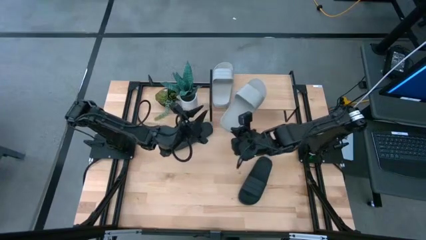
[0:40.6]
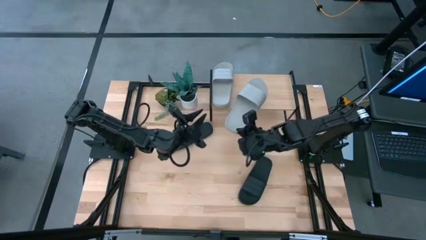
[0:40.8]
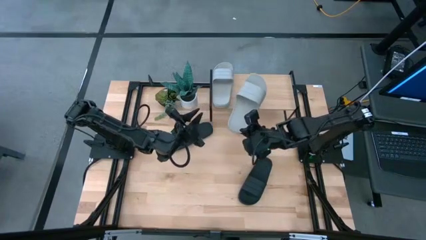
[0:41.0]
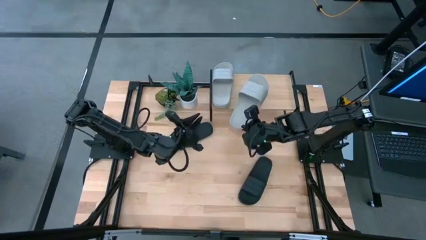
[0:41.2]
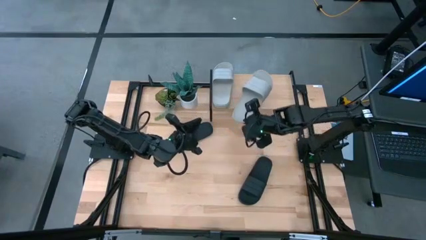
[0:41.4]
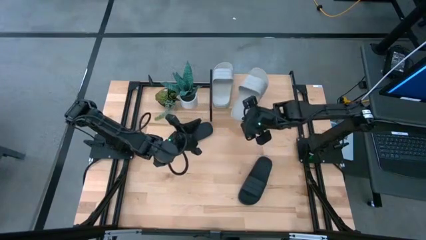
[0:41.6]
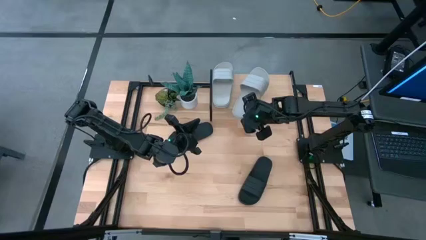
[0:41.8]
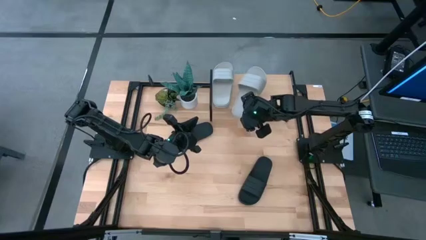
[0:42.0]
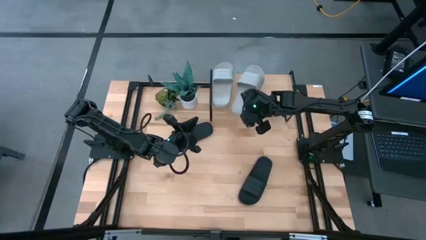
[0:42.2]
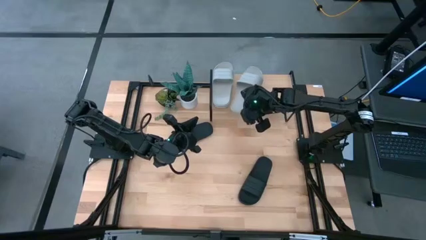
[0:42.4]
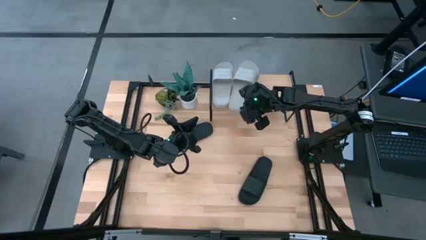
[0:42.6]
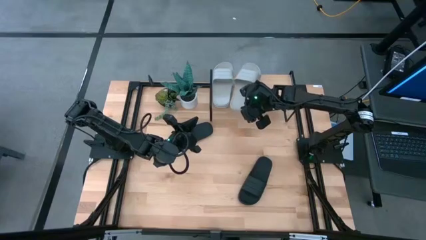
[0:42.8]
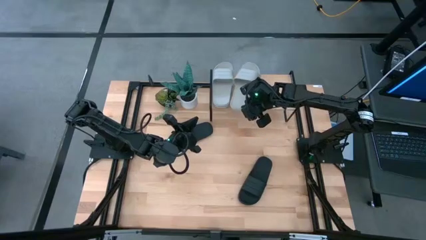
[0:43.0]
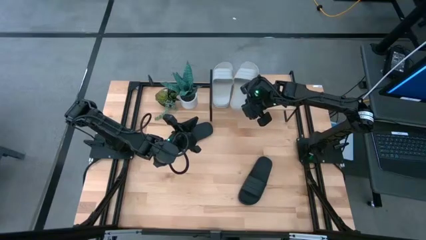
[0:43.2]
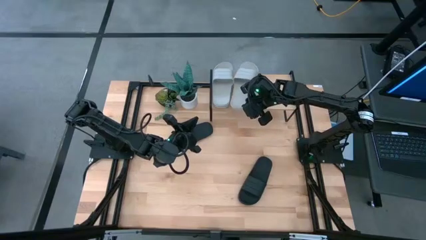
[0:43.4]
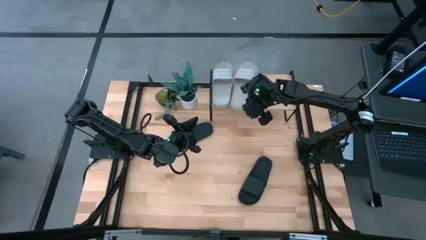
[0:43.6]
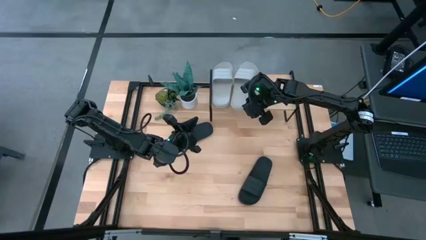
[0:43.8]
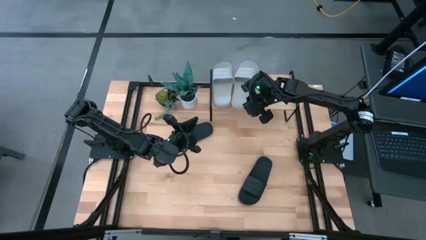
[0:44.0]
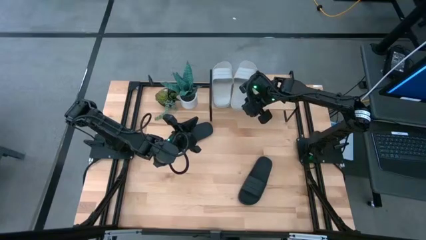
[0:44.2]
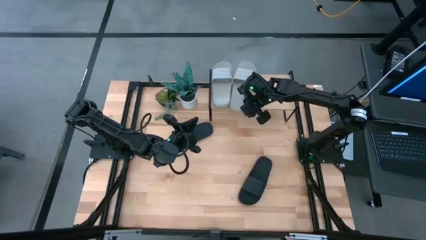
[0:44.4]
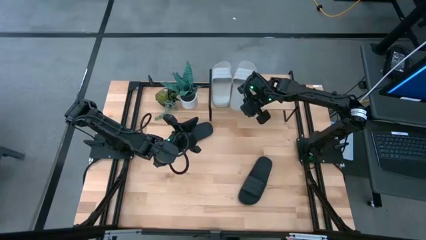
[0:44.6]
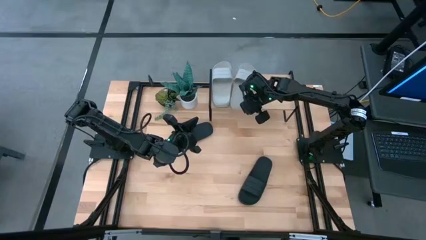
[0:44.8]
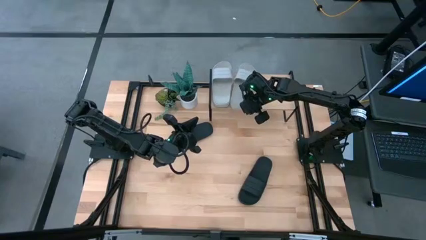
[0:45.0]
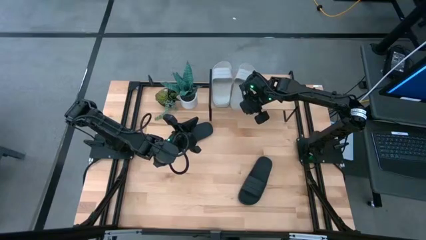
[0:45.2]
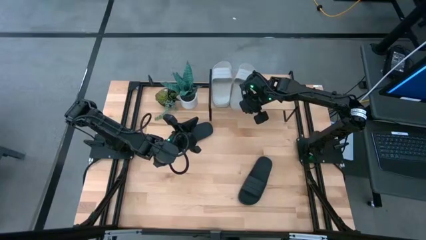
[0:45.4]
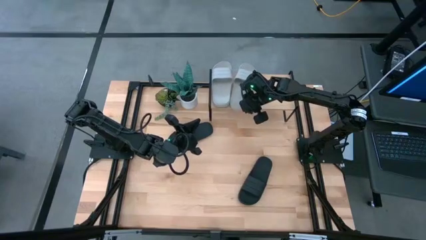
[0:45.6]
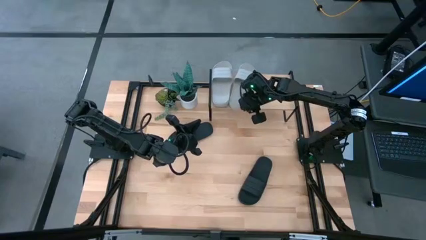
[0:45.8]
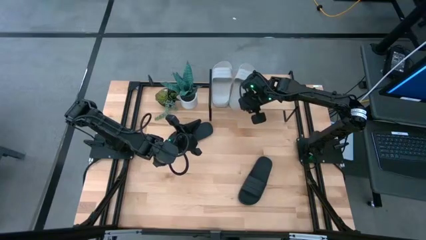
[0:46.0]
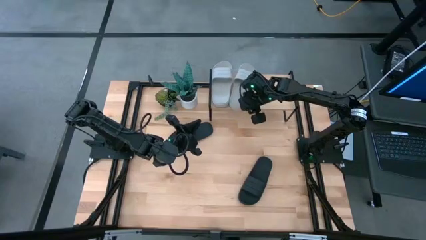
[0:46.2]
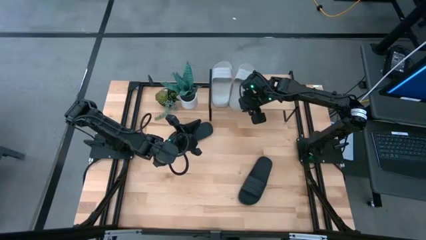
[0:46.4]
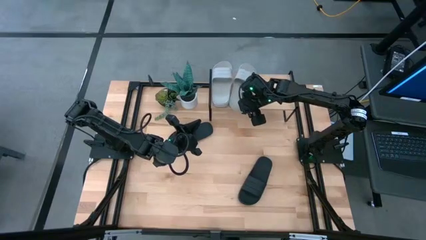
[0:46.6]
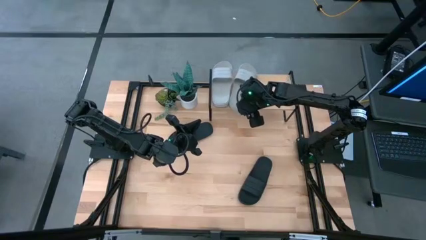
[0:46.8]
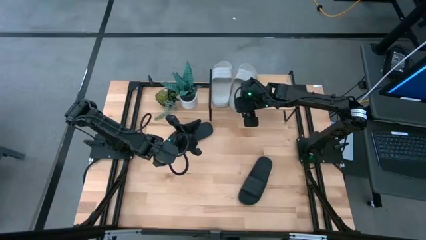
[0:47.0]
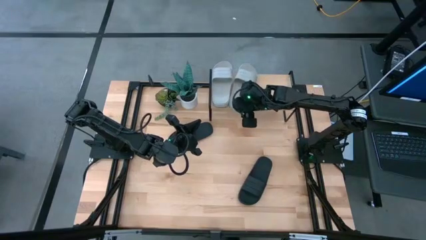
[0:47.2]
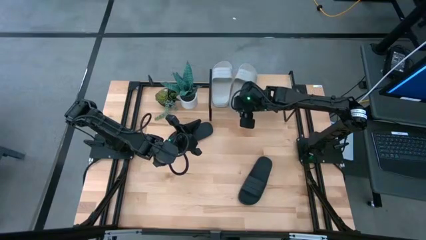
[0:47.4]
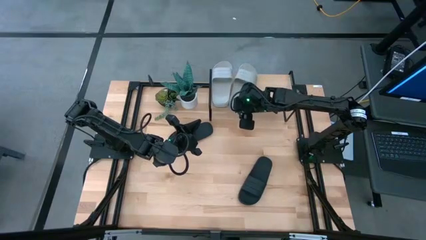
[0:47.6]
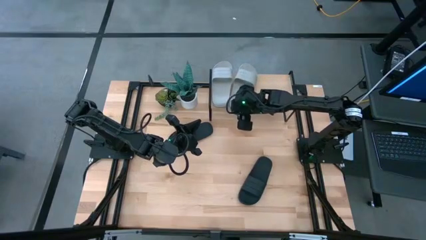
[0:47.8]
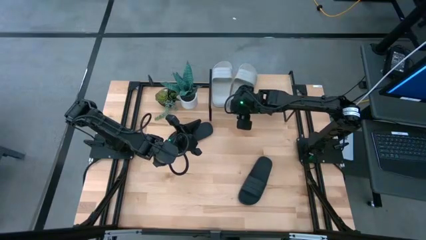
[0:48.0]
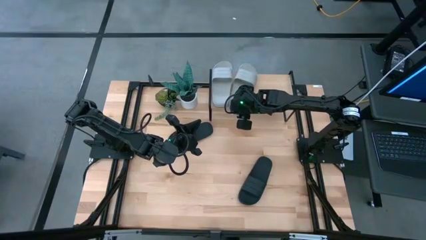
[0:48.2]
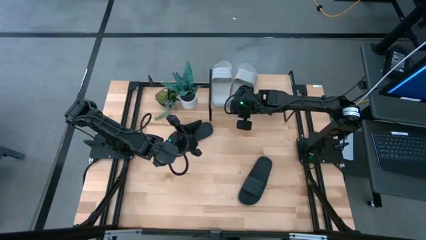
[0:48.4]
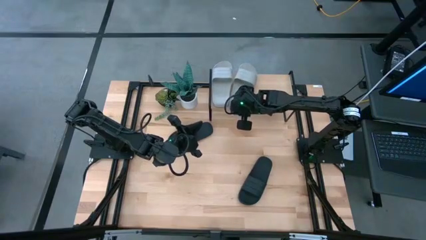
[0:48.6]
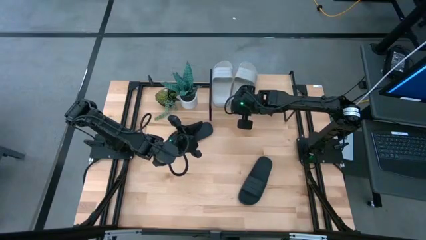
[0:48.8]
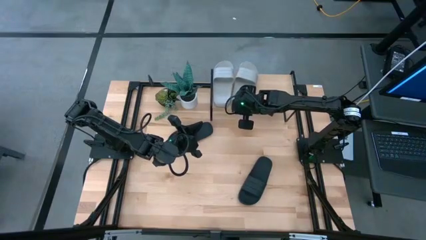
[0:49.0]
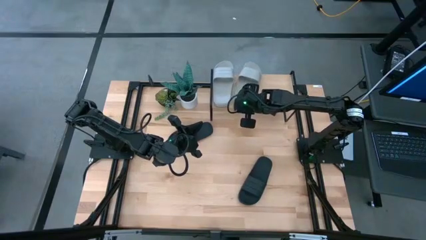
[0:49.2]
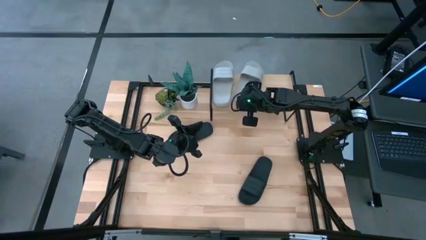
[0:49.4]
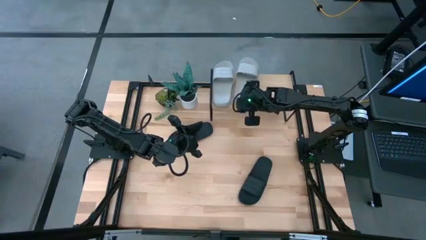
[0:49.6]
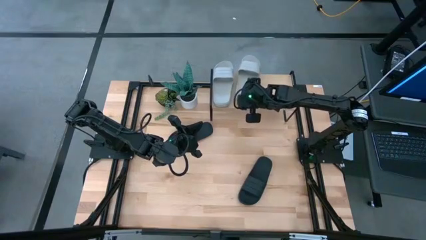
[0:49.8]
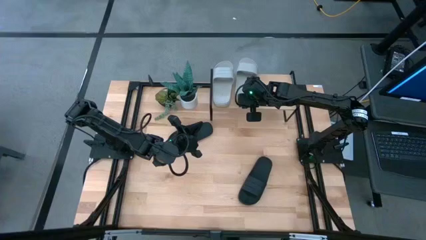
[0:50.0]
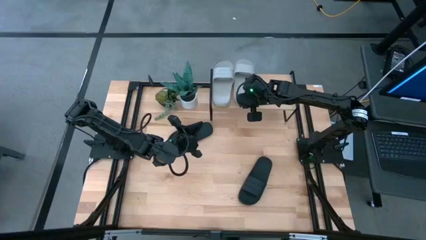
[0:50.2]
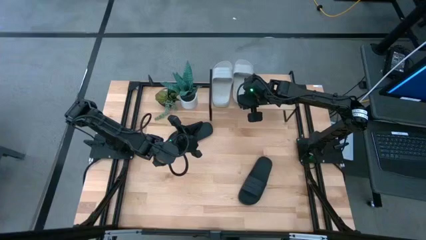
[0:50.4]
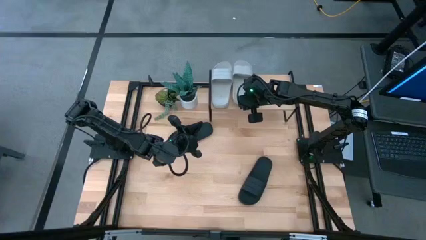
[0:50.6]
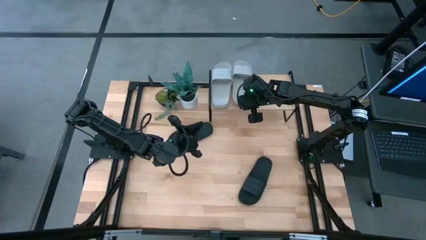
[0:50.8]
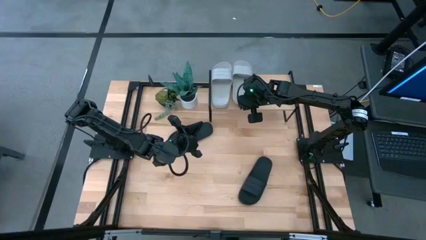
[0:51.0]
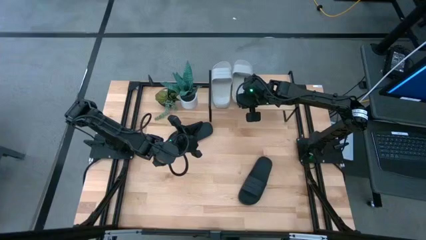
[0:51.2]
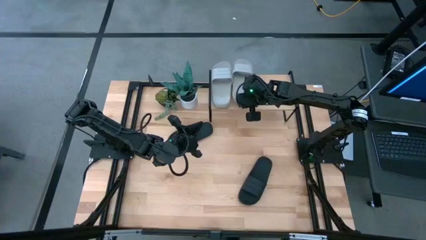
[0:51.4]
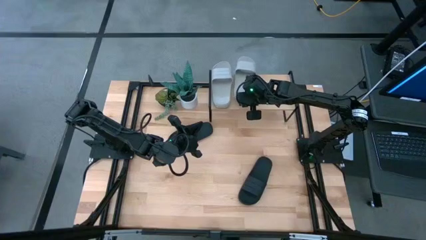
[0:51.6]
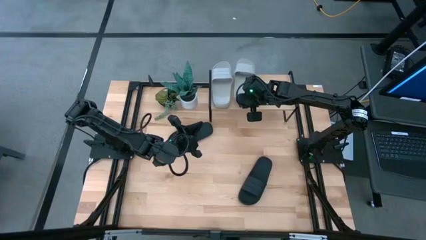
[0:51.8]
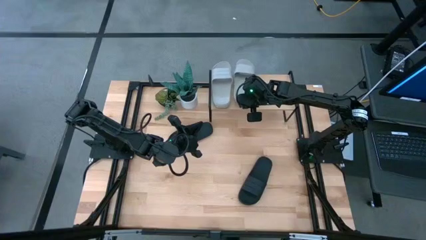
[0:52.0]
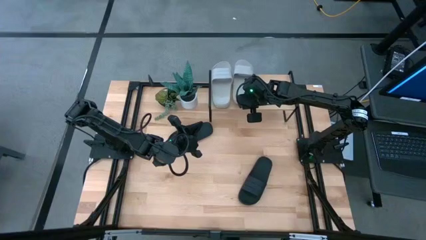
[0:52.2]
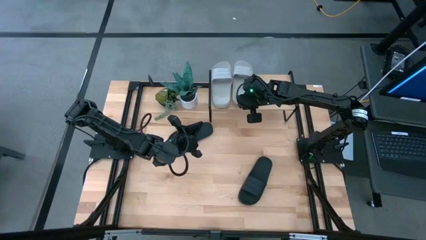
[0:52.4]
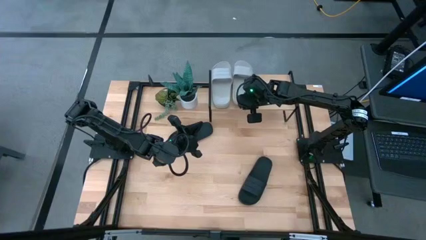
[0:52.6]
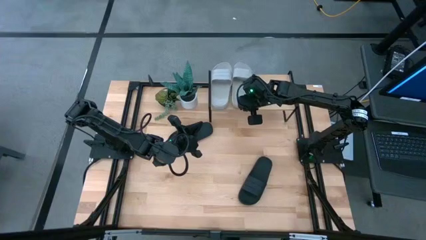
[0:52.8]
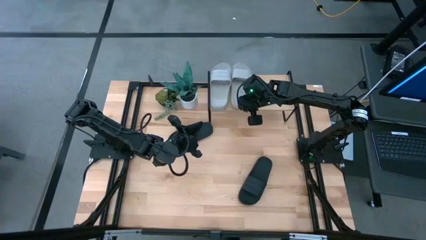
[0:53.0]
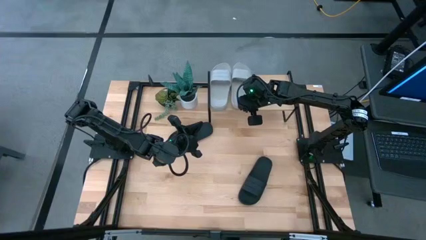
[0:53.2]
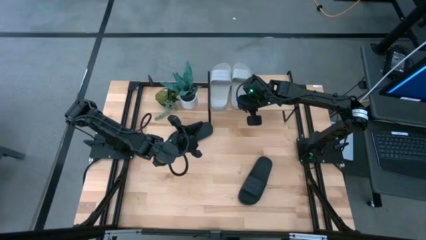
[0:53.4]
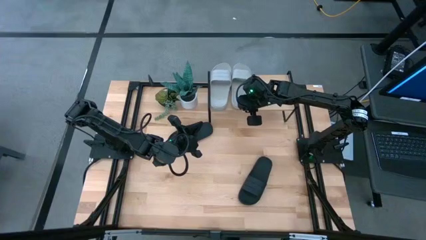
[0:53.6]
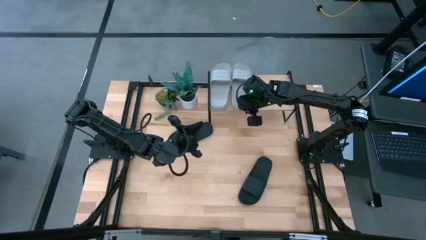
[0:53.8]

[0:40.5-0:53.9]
Task: Pick and place slides into the shelf
Put the gray slipper on the shelf

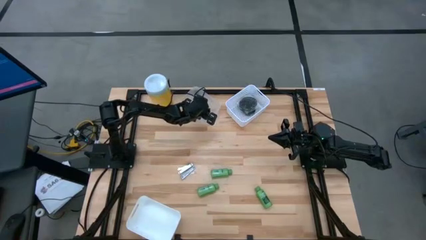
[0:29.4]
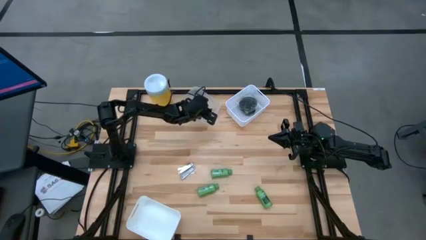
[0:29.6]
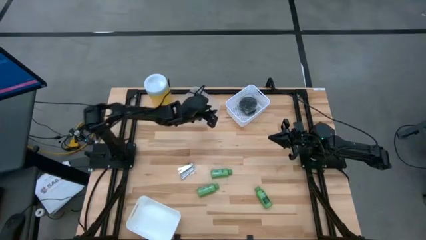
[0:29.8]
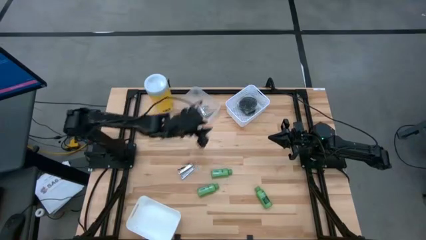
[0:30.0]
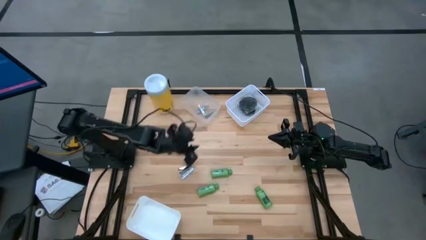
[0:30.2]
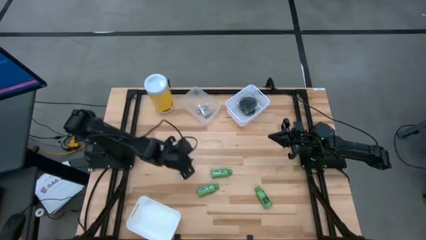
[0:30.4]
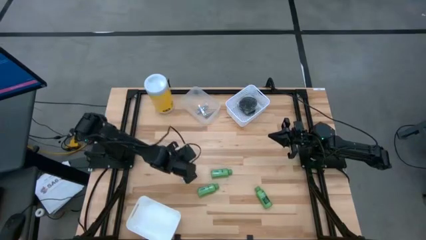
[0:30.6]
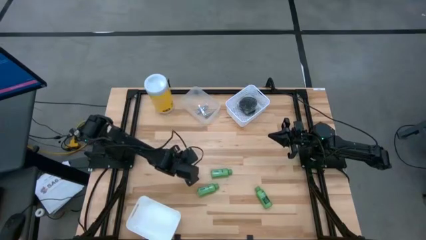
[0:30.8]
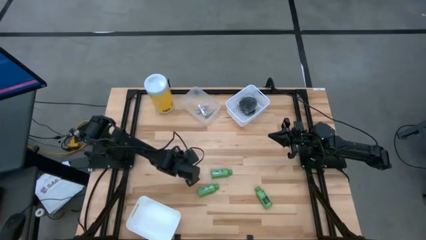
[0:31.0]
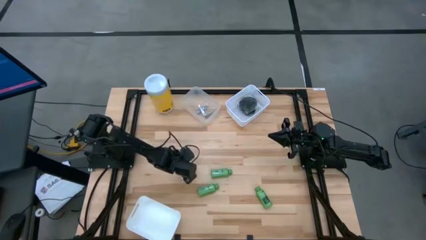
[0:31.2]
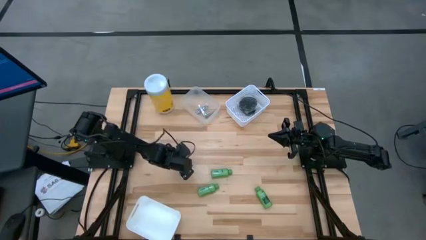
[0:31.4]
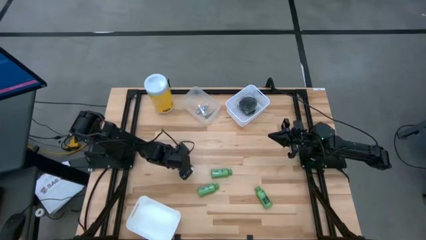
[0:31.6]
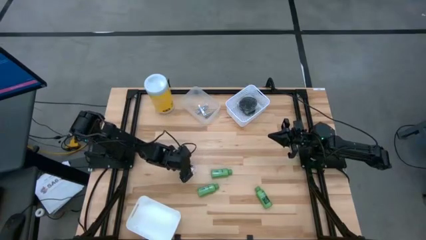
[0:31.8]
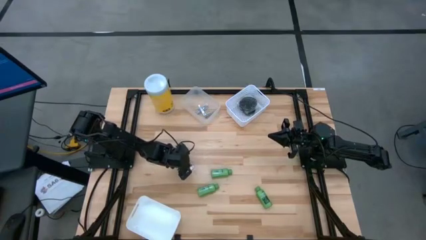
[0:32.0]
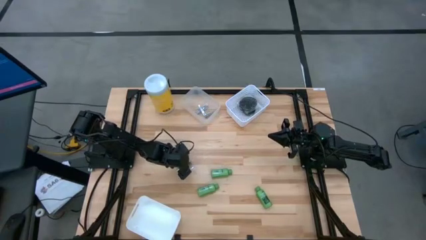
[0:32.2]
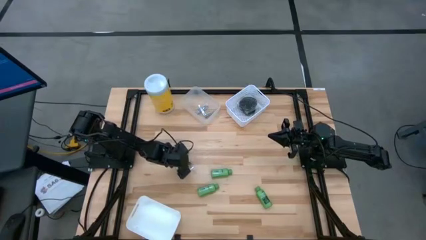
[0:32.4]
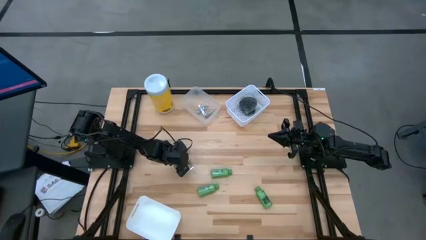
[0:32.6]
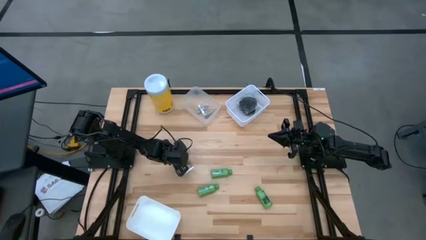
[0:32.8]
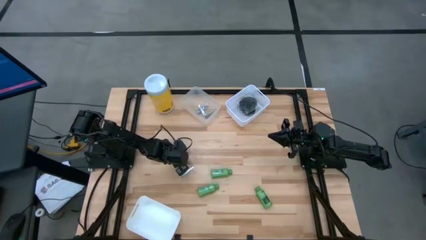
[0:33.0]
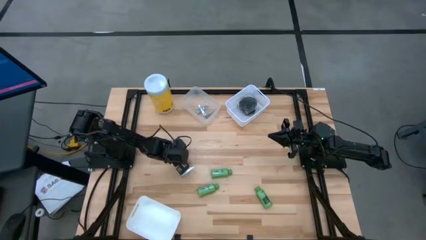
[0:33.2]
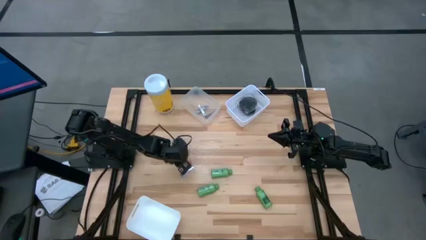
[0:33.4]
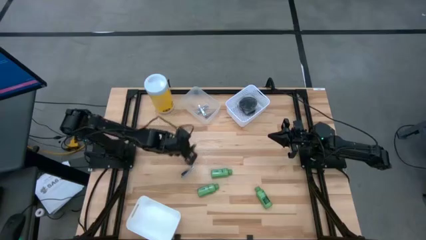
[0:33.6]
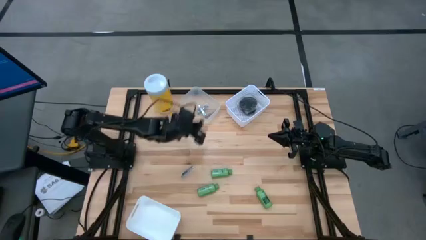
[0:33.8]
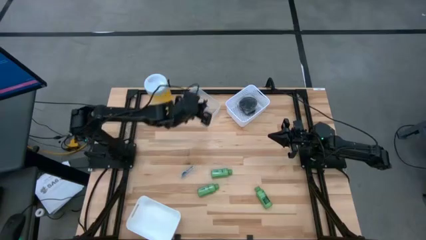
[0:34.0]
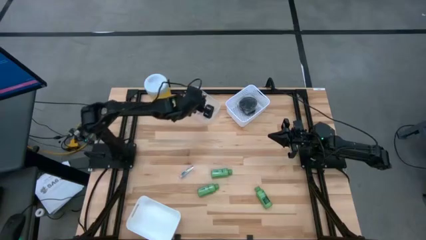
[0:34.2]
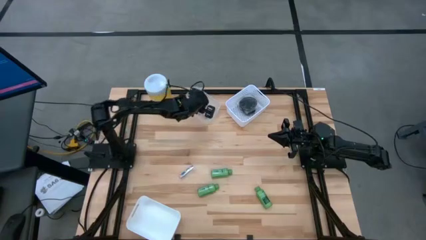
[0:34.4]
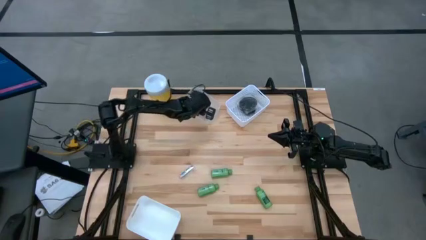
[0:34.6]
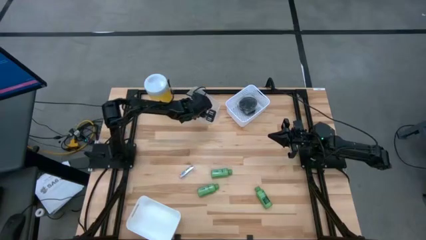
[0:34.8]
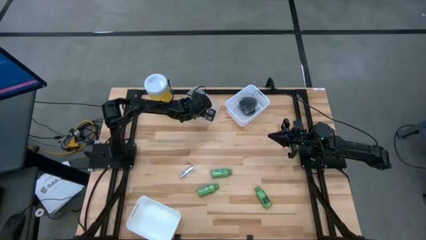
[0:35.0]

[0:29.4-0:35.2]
Task: Pick & Place Travel size toiletries
Put the silver nail cutter into the transparent bin
